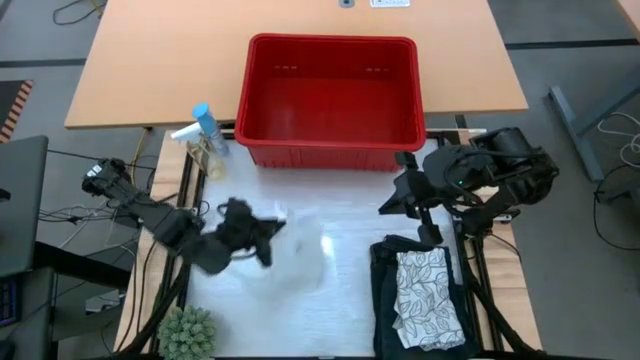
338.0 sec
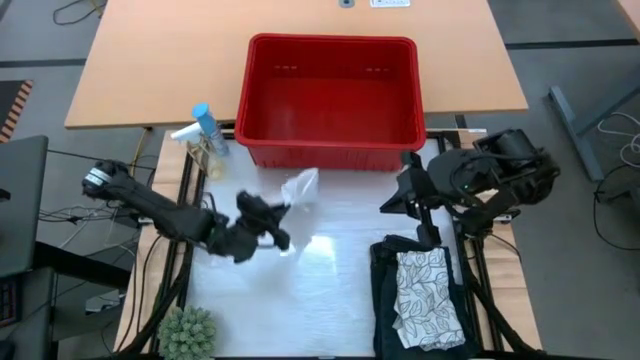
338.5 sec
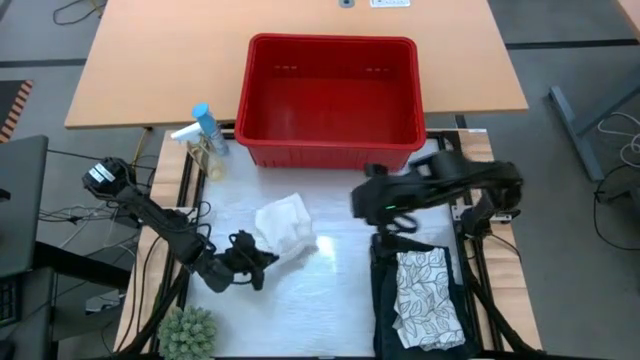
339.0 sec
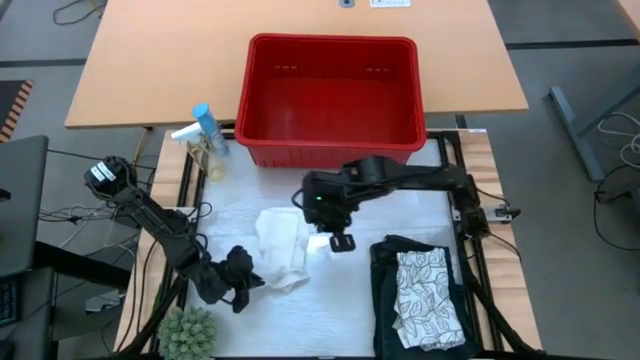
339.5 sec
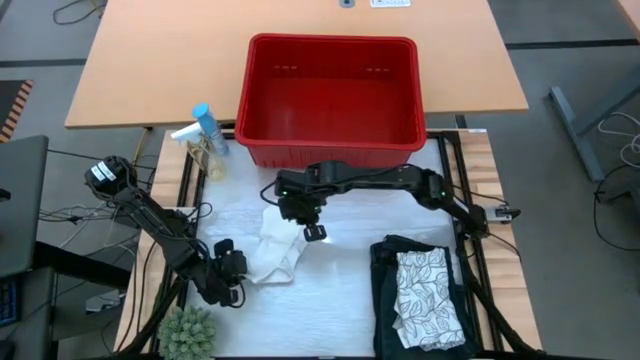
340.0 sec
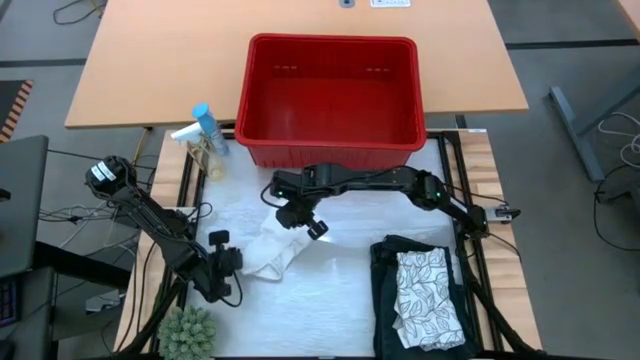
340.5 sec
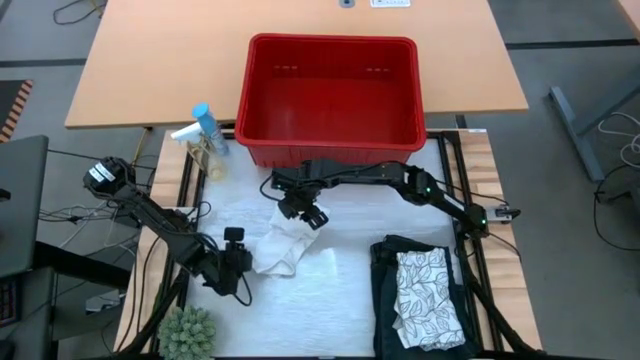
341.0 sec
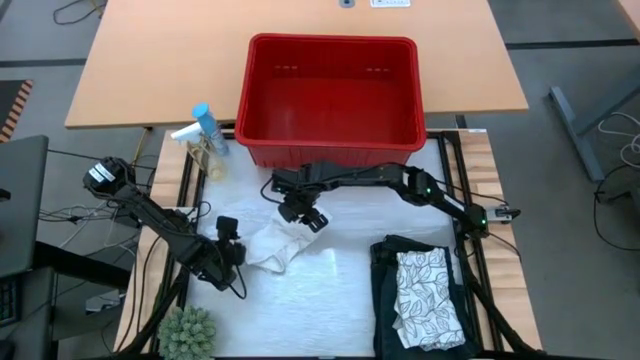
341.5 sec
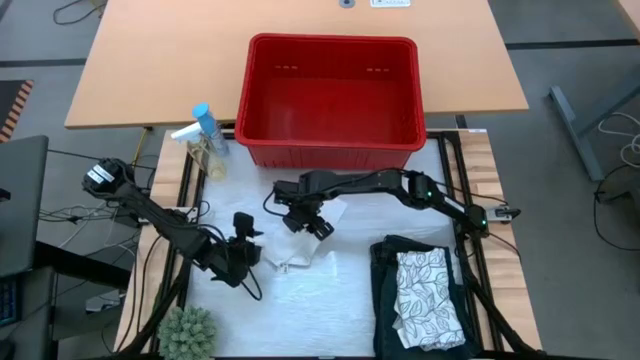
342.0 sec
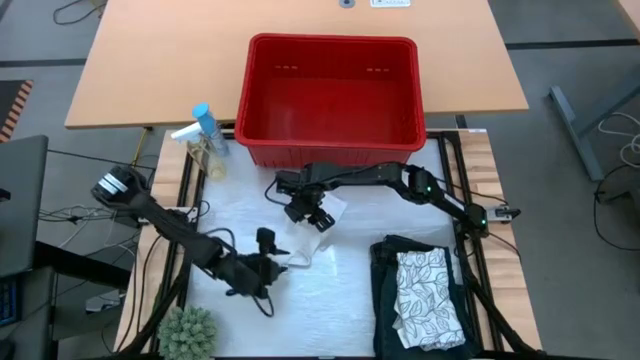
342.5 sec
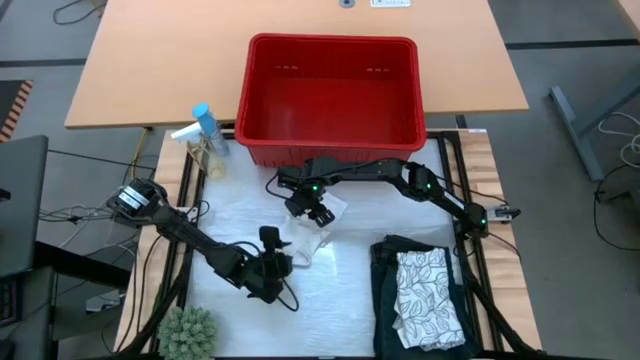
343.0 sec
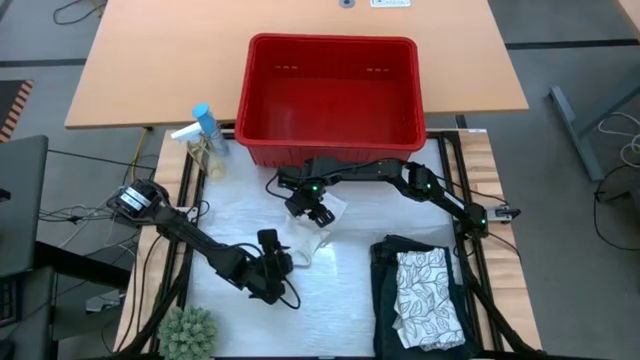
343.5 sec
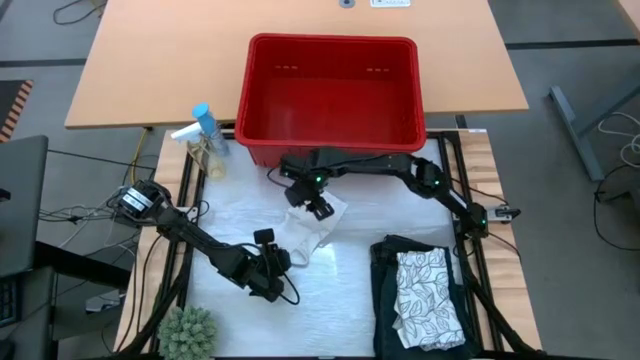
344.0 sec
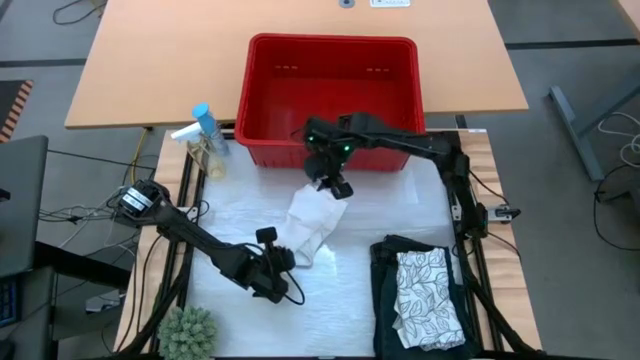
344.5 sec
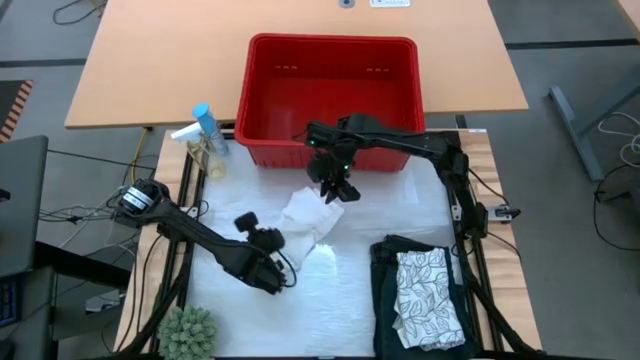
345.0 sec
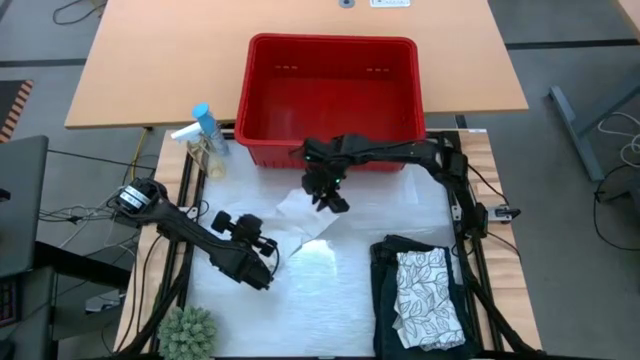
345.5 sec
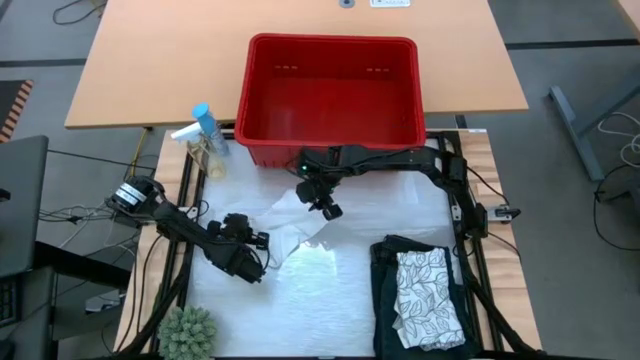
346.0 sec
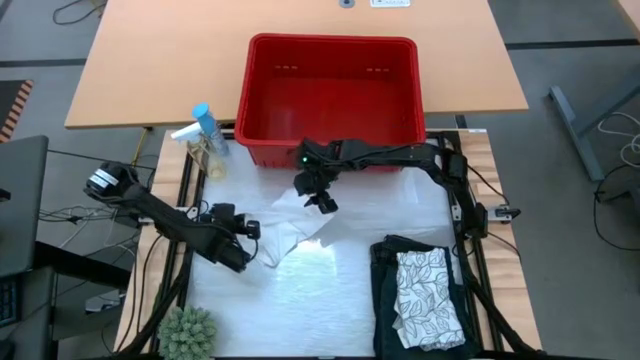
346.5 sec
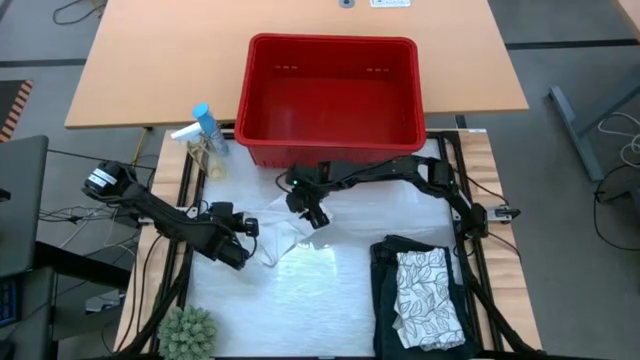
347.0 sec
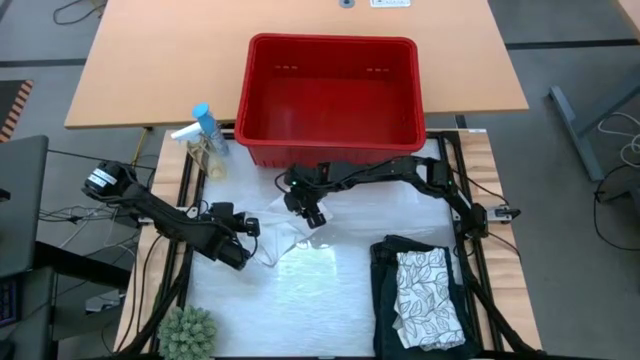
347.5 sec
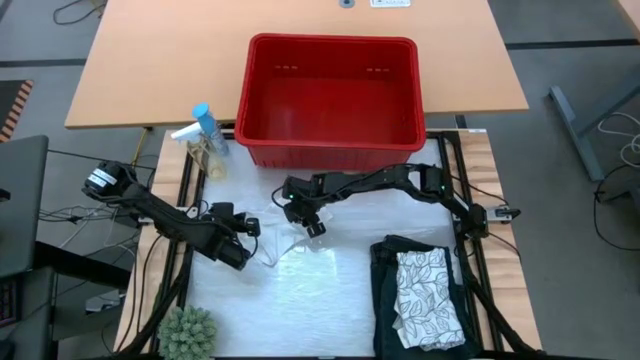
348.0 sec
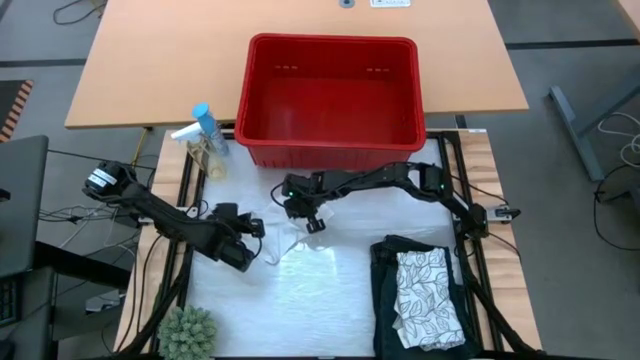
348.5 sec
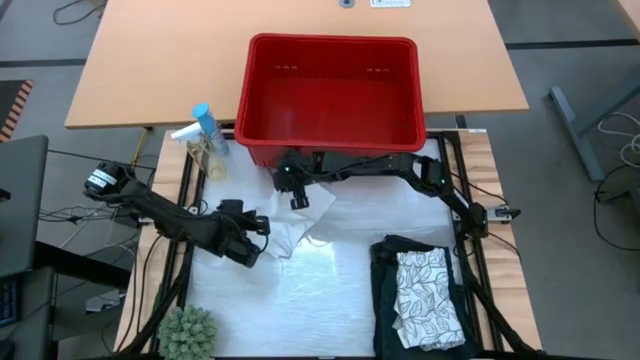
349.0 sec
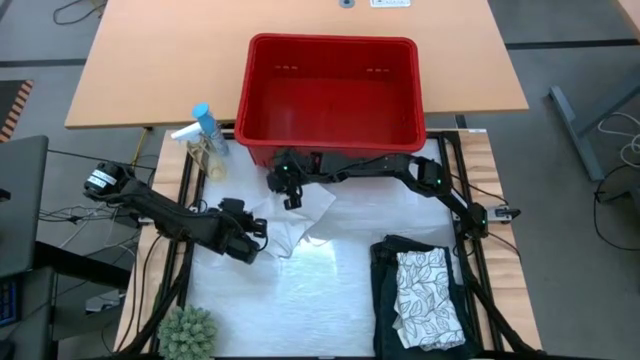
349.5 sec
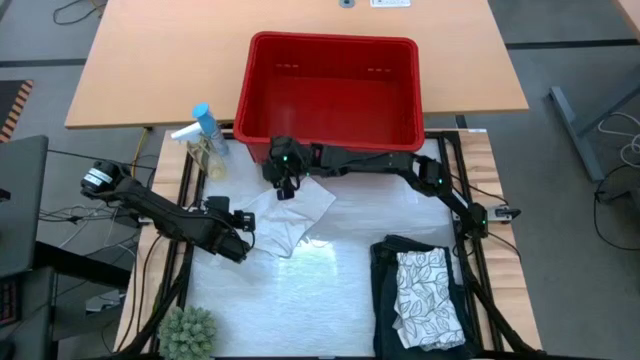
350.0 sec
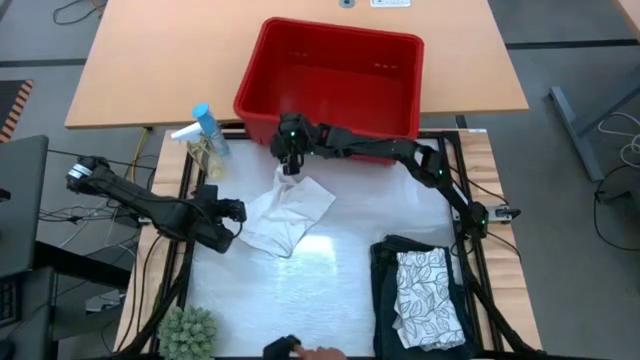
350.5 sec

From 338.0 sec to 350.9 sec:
Task: Fold Laundry from Bin
Fold the white boxer from the red laundry bin

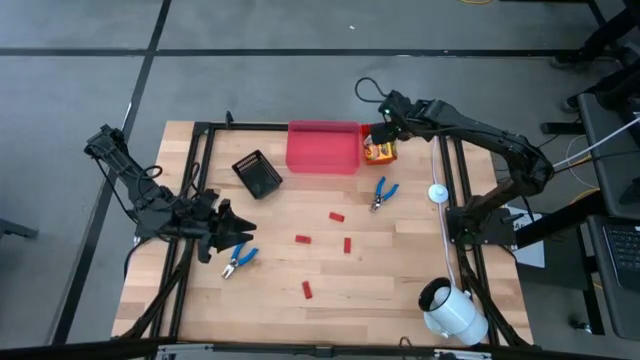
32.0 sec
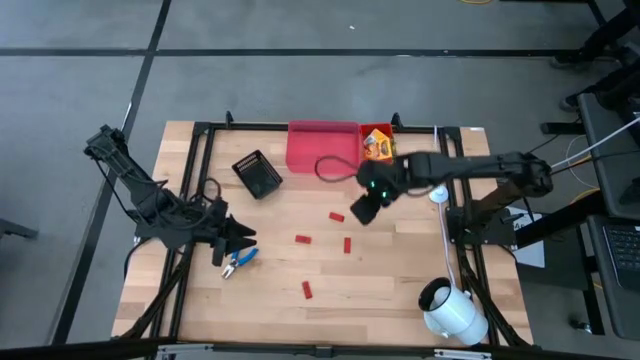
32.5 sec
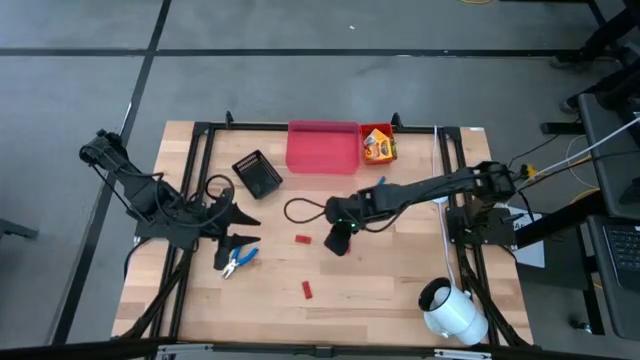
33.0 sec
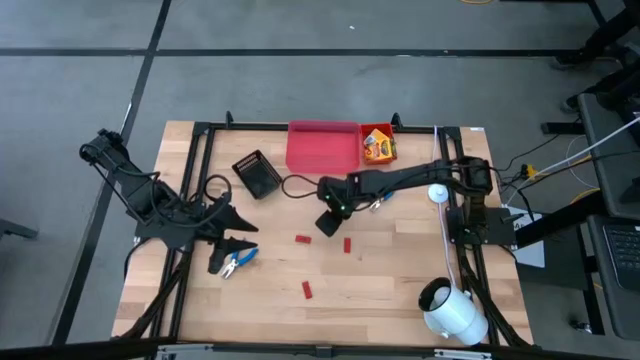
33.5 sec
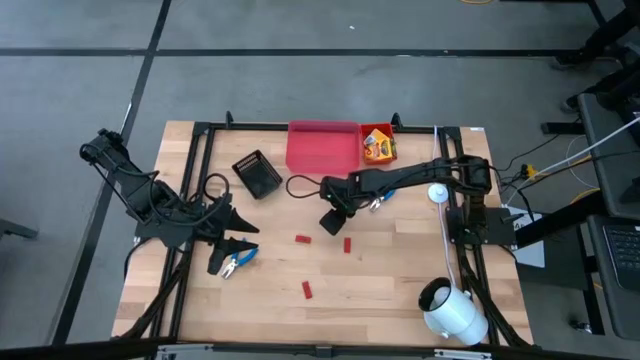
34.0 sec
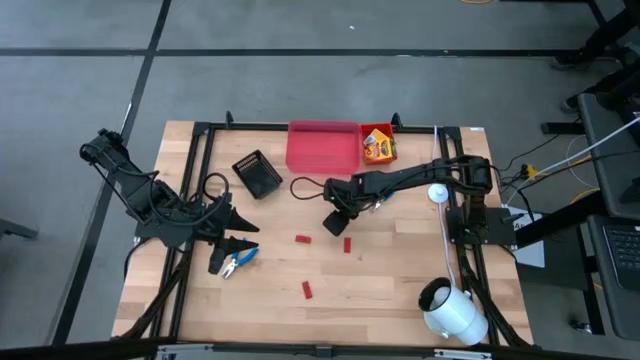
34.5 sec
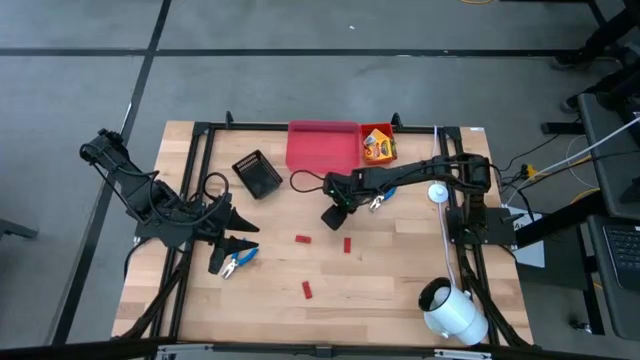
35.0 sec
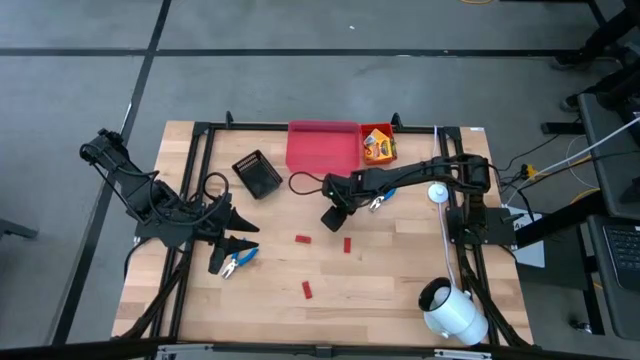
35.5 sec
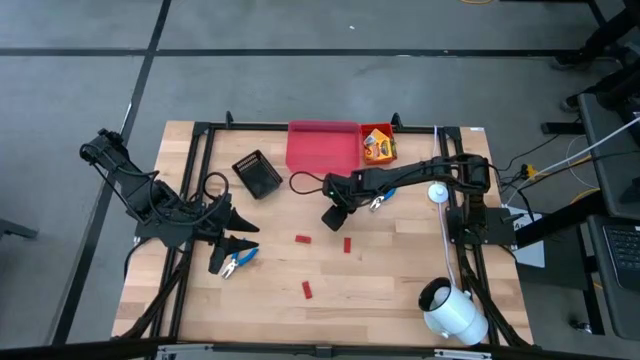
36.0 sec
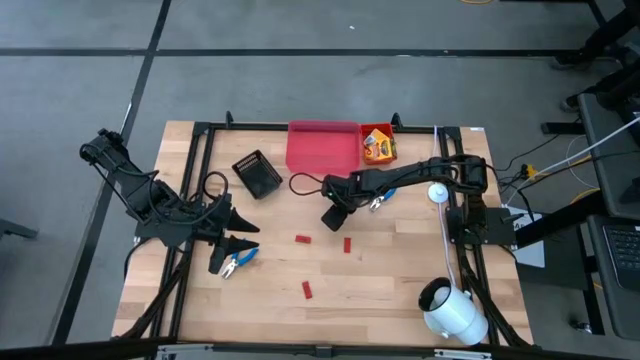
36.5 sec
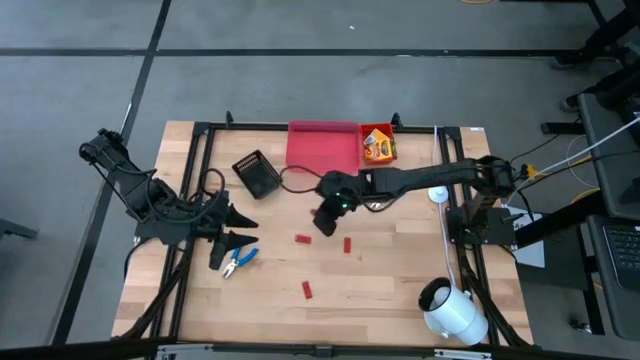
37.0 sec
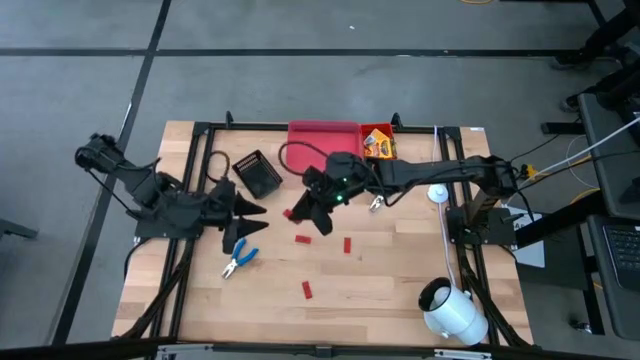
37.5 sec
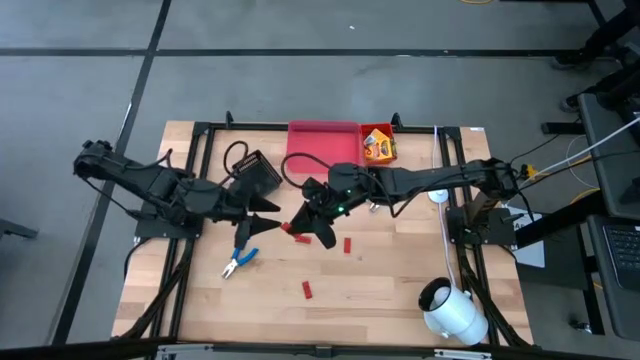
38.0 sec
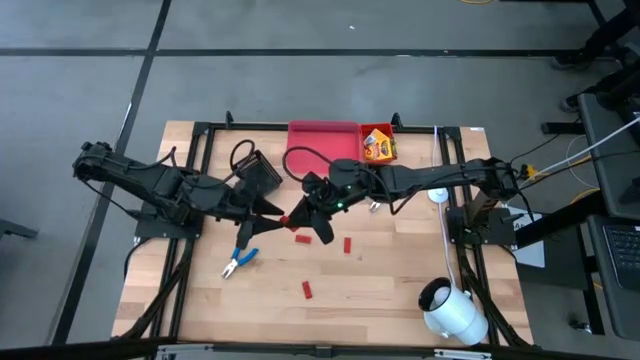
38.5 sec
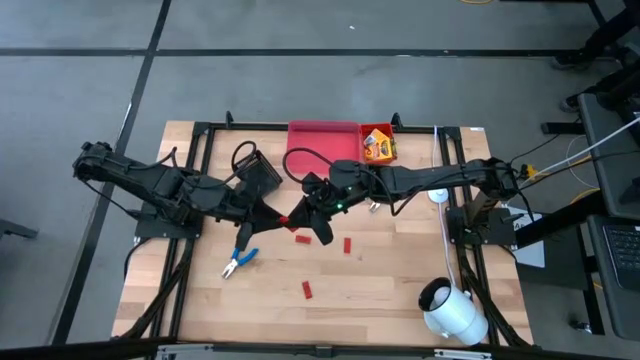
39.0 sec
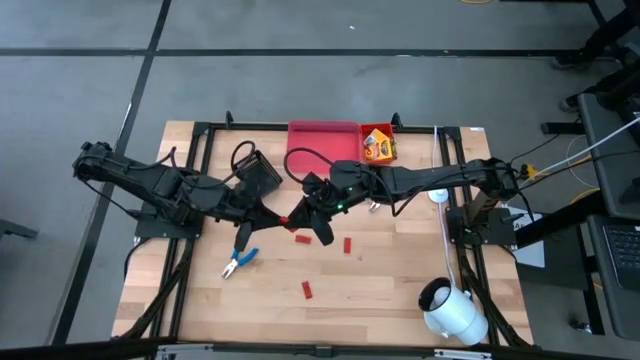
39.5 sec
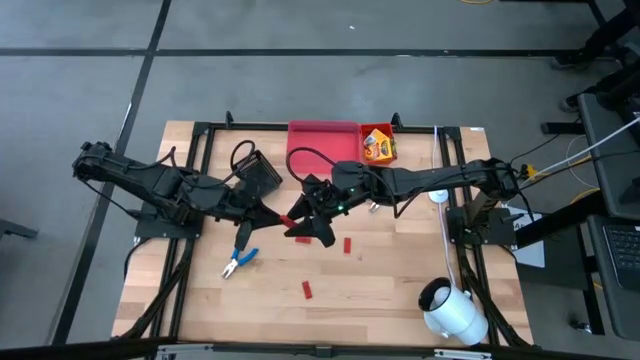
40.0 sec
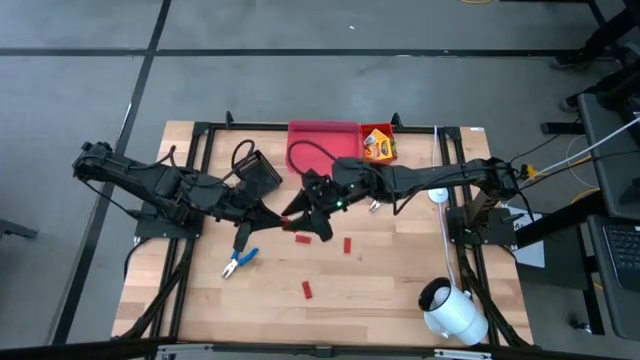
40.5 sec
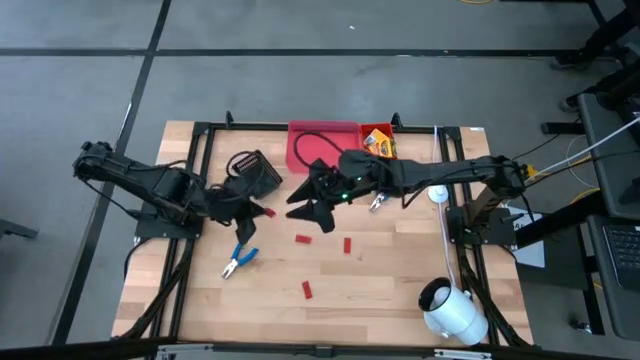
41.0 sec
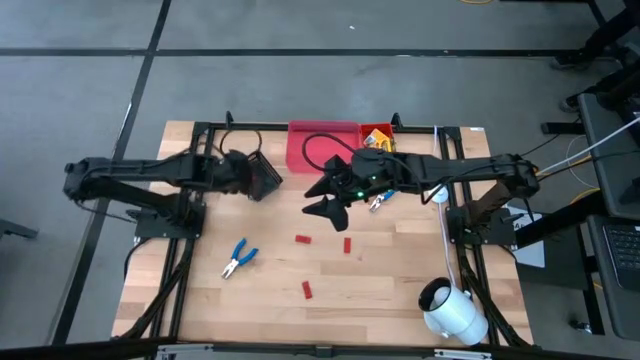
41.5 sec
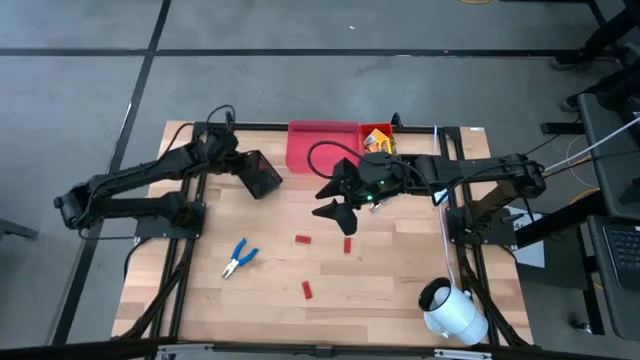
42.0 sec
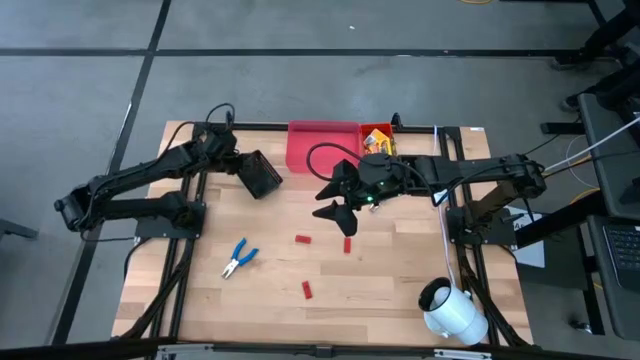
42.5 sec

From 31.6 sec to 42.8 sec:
Task: Pick & Place School Supplies
Put the red eraser into the black bin
